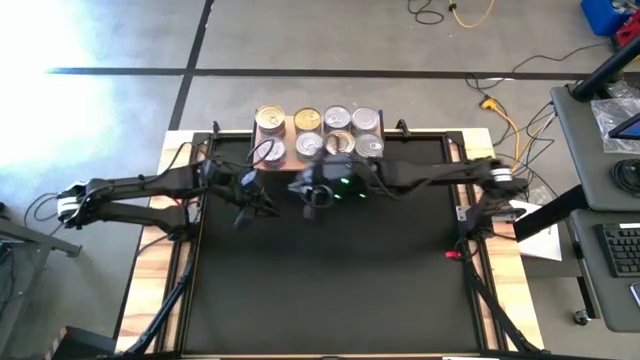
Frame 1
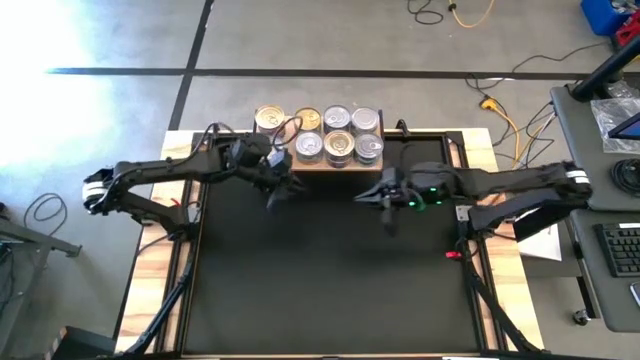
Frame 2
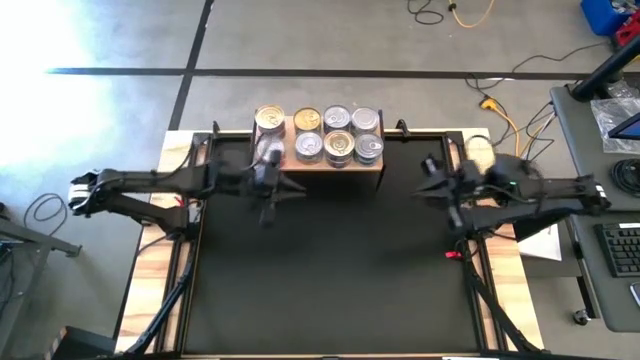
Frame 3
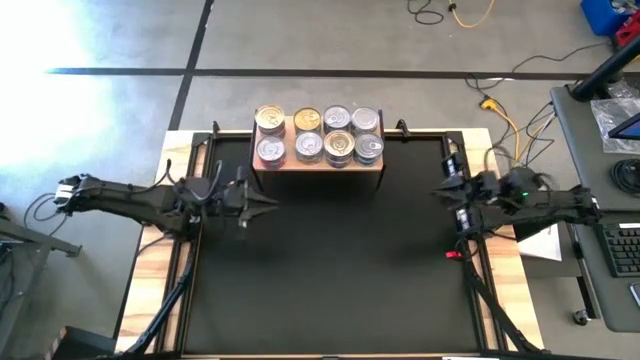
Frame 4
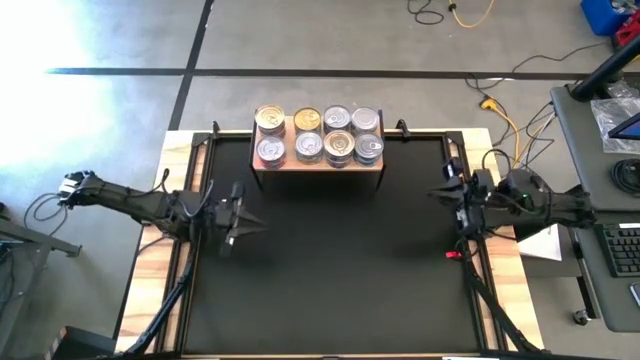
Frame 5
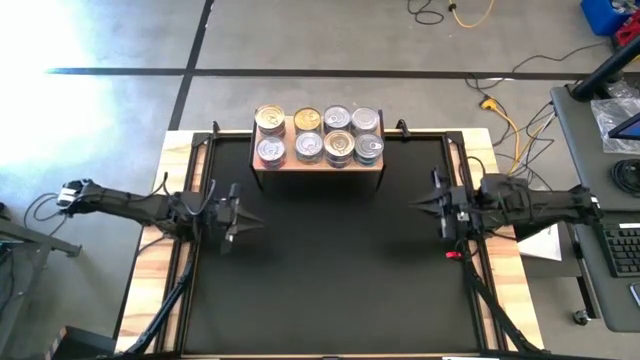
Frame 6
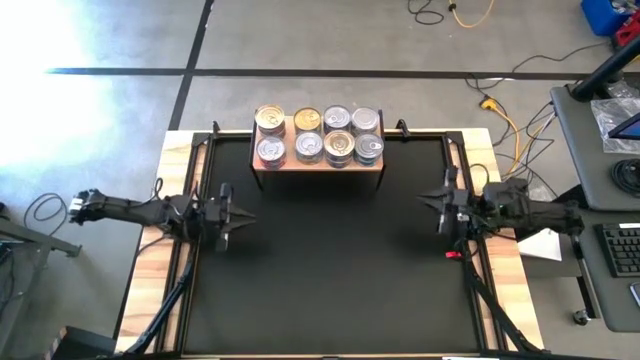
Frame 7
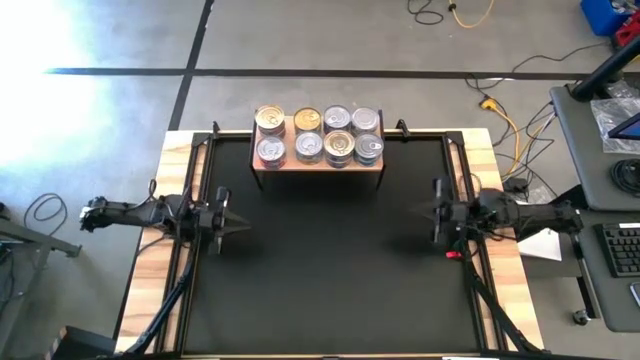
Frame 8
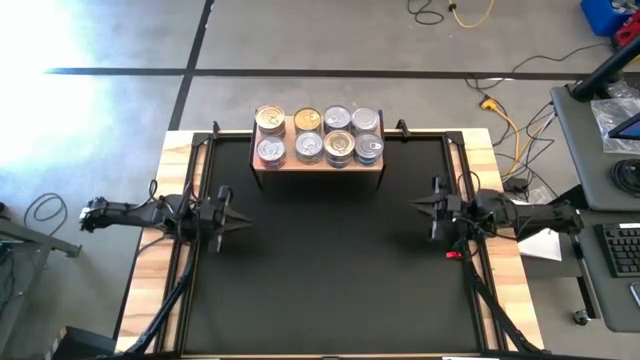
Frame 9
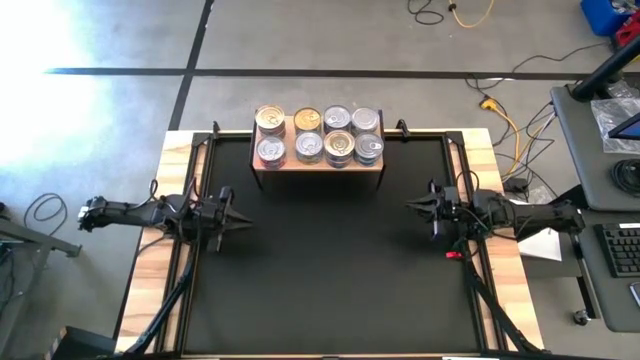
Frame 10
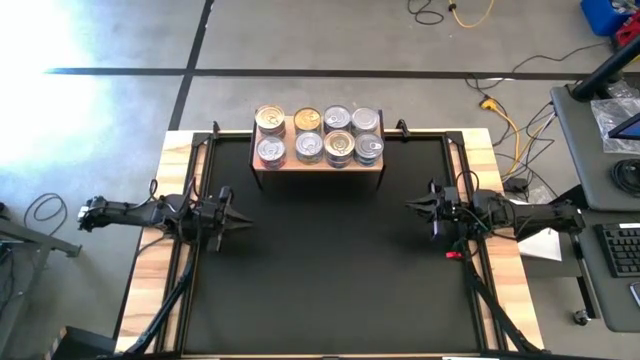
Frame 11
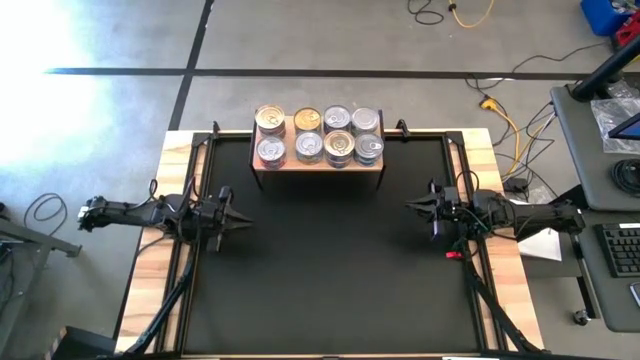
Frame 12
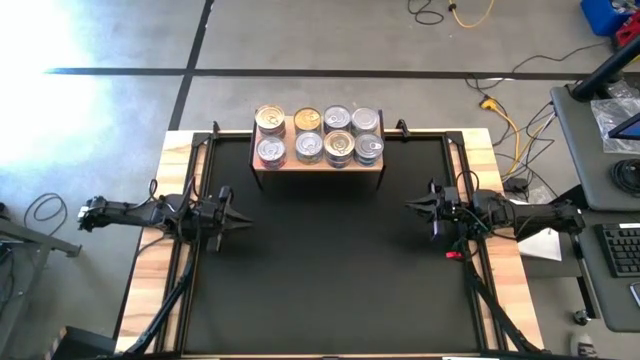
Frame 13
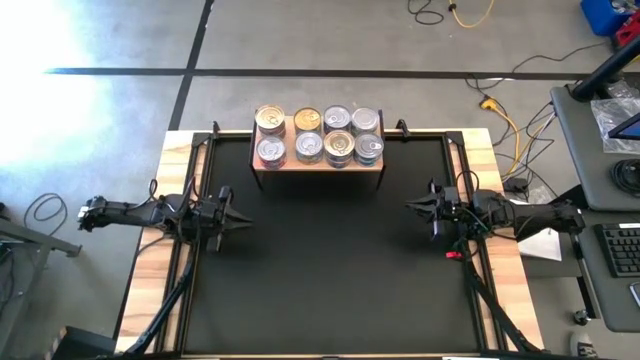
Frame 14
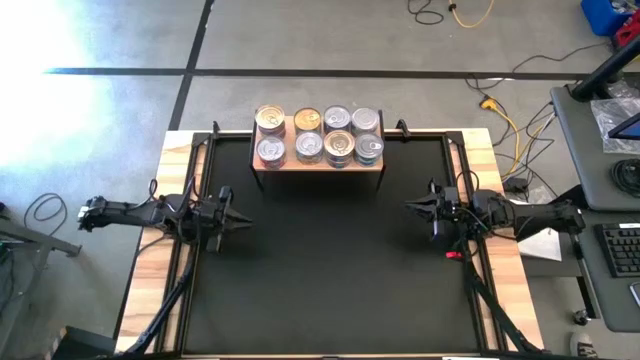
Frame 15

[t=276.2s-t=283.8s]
Task: Stack canned seafood by type on shelf
Return to Home Position

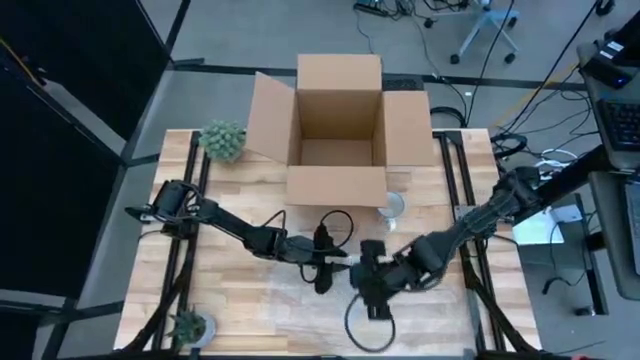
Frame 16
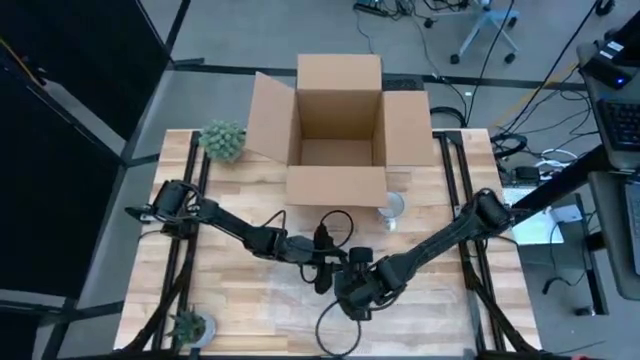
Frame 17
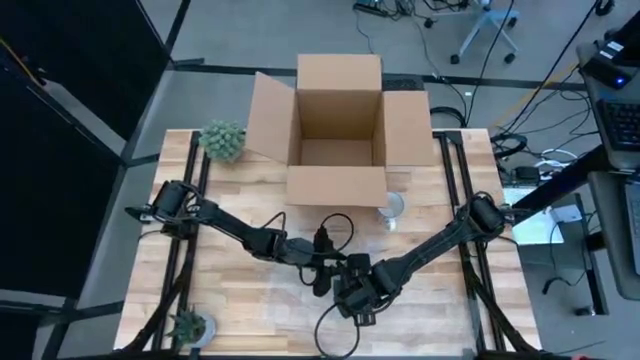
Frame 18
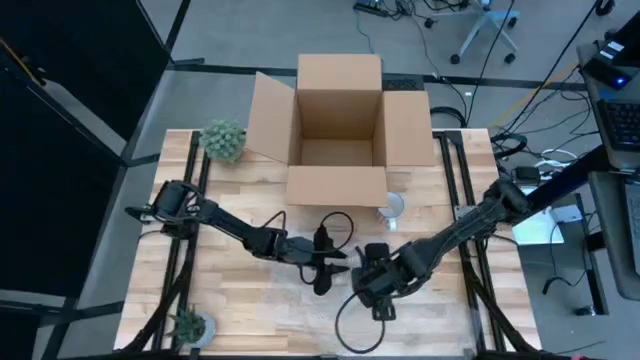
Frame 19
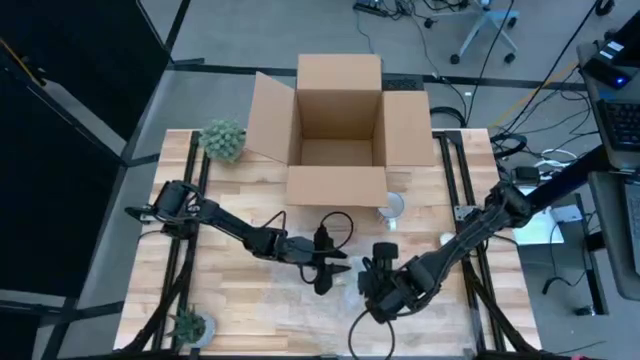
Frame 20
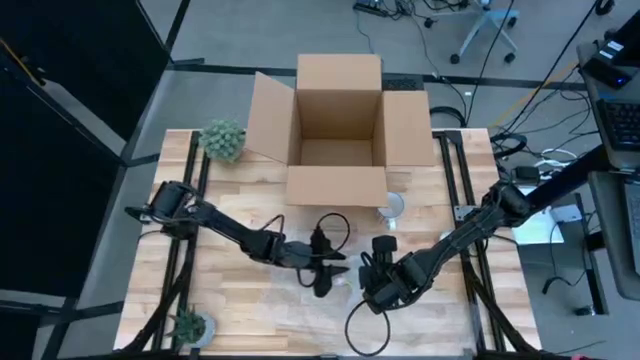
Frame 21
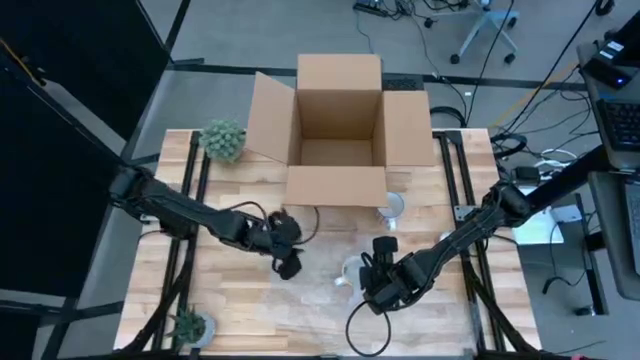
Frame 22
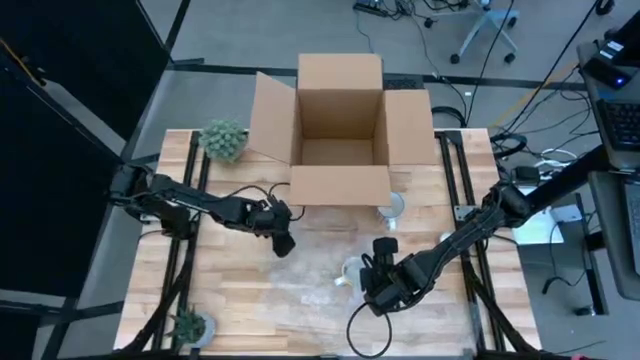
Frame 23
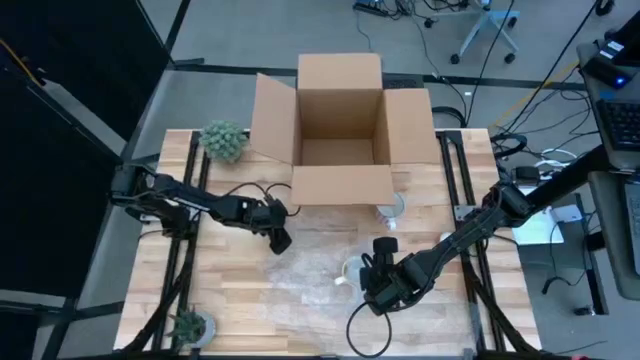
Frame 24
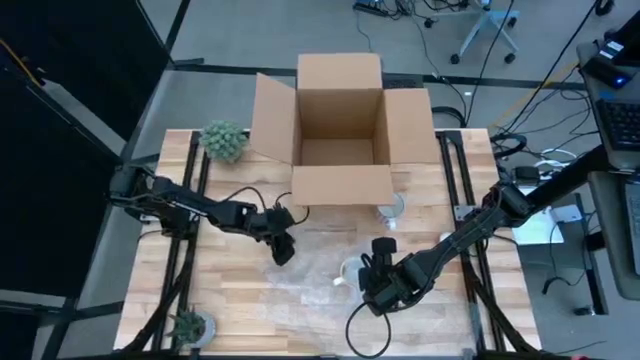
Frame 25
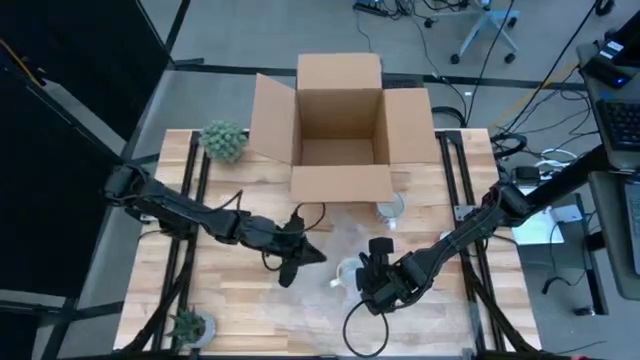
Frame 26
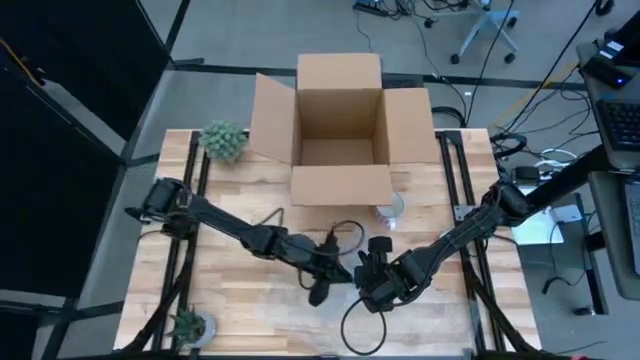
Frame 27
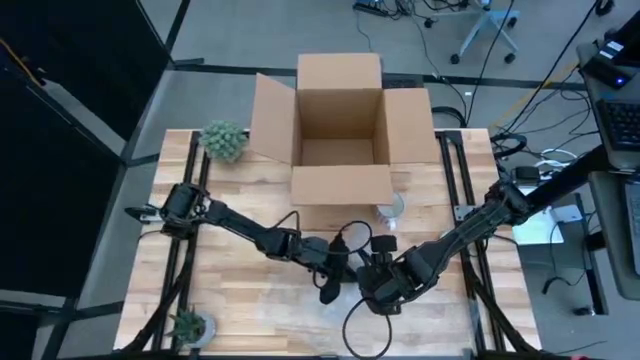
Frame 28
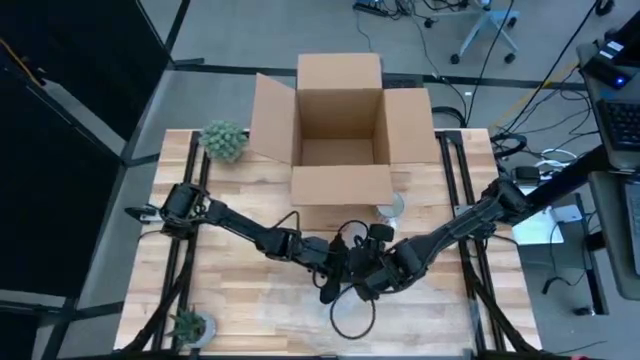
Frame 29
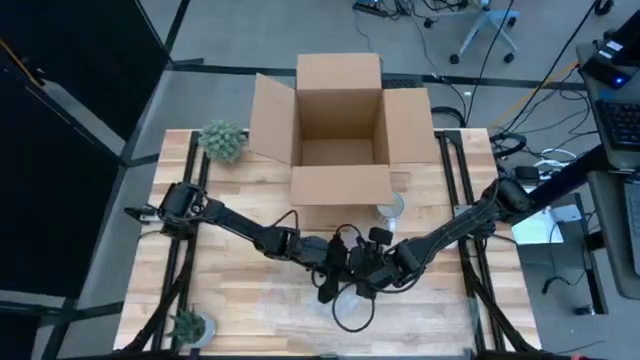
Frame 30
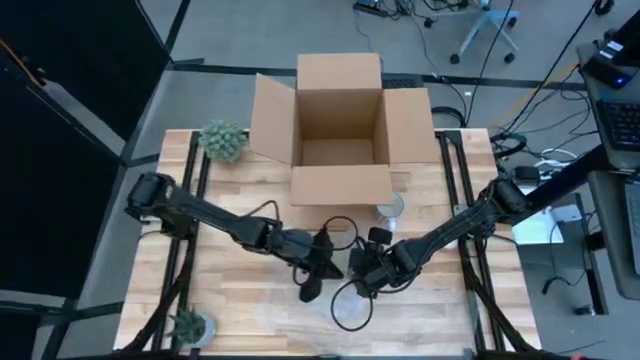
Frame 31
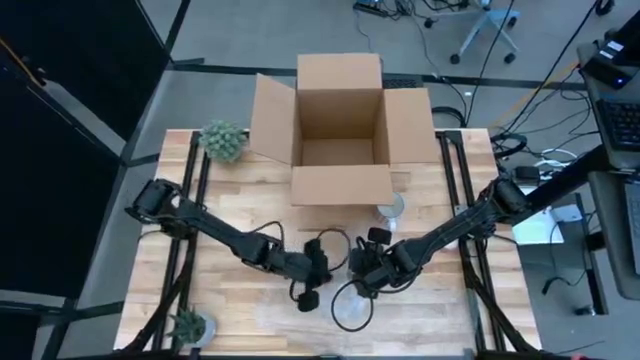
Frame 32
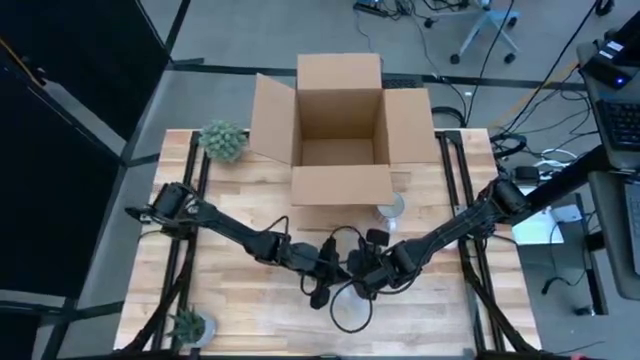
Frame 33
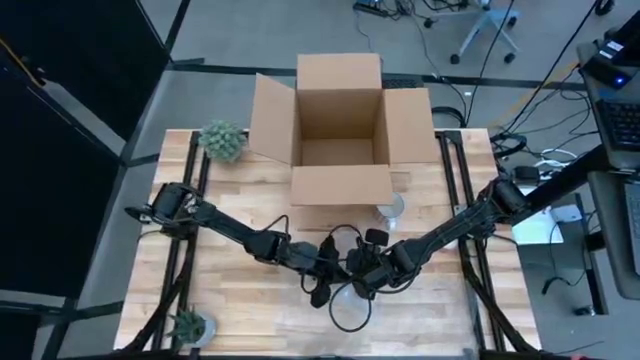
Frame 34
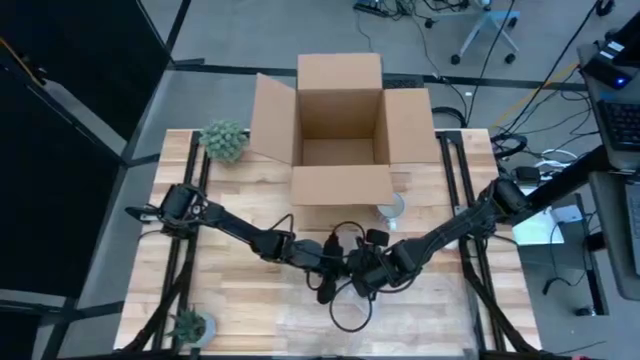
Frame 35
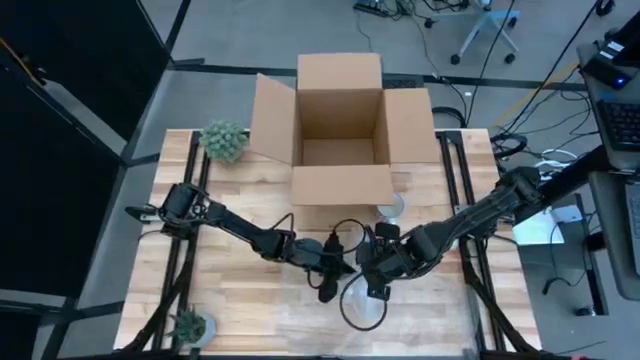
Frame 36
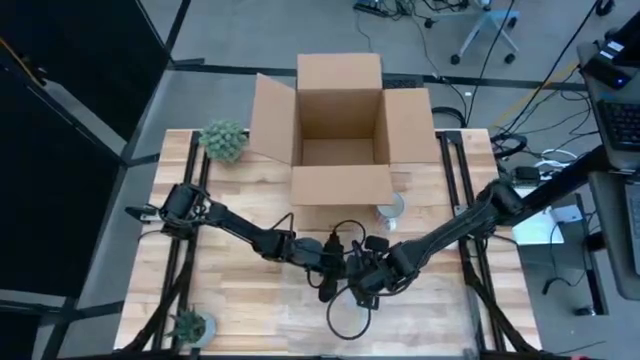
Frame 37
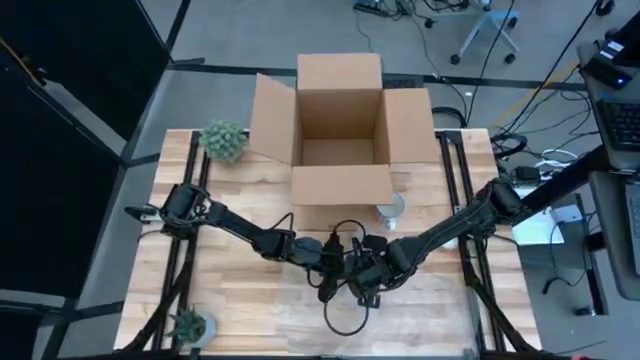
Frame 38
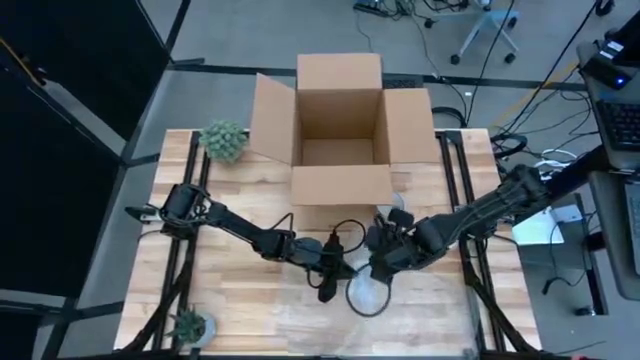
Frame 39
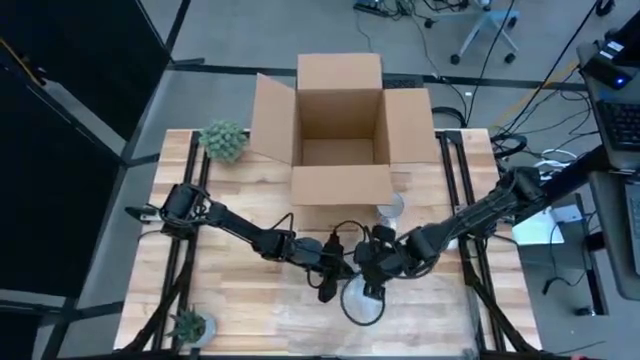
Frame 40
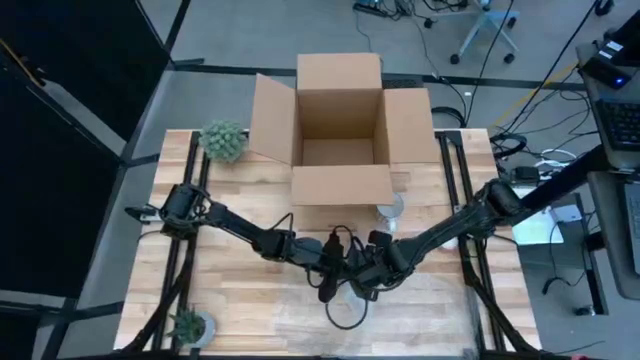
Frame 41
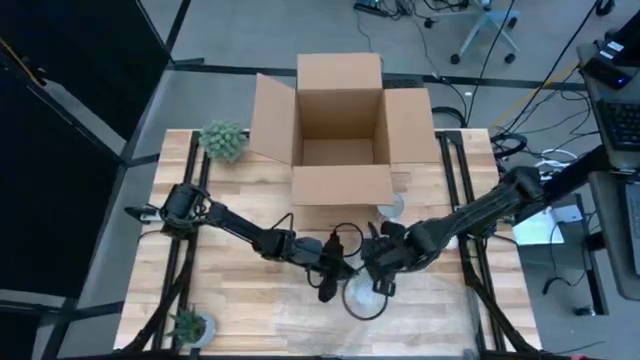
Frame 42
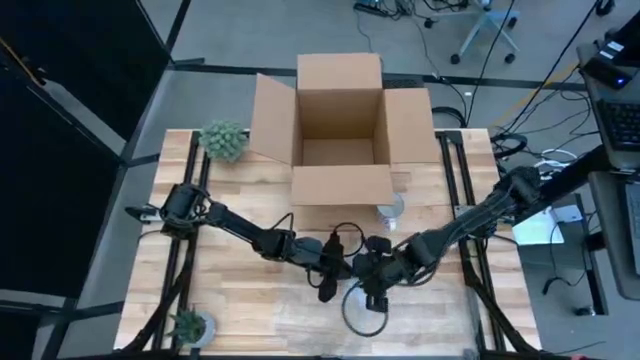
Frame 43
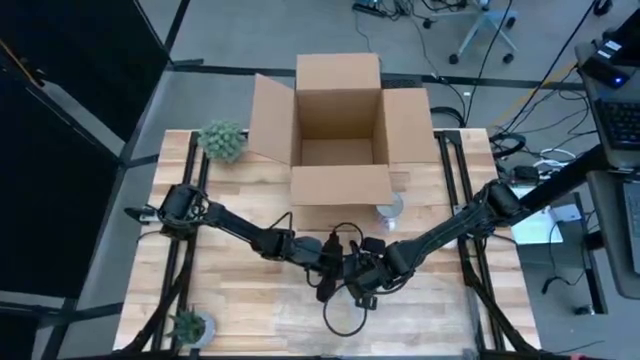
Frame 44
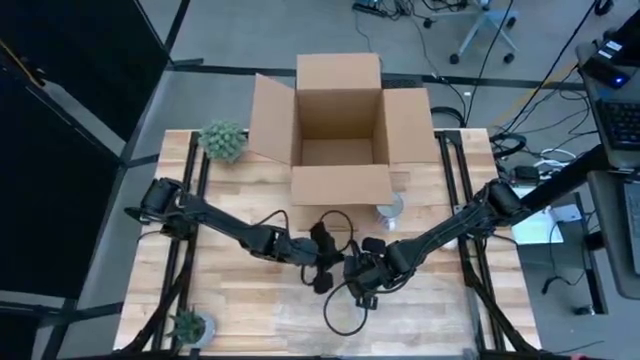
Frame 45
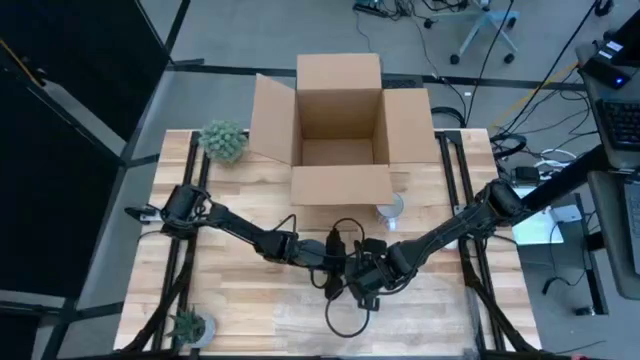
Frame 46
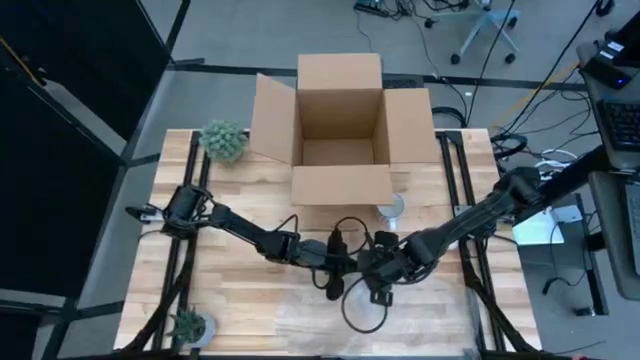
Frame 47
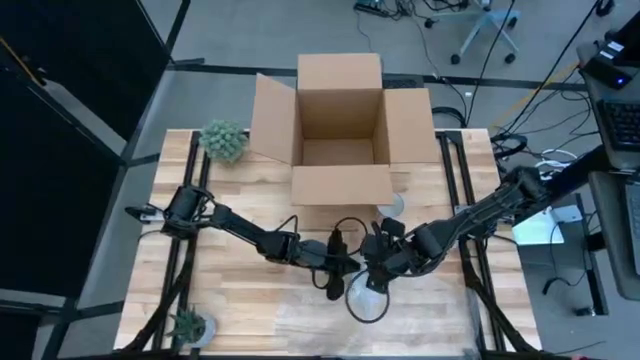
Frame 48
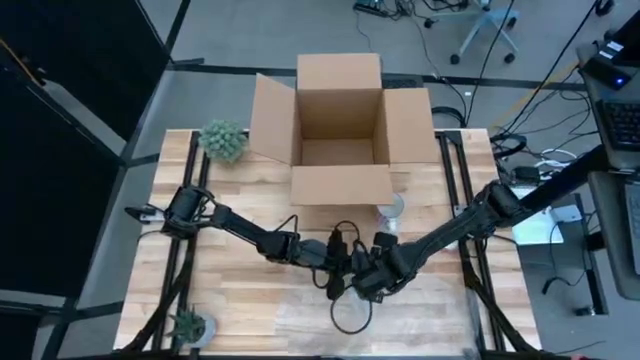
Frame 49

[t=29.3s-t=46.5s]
Task: wrap mug
Wrap the orange mug with the bubble wrap
